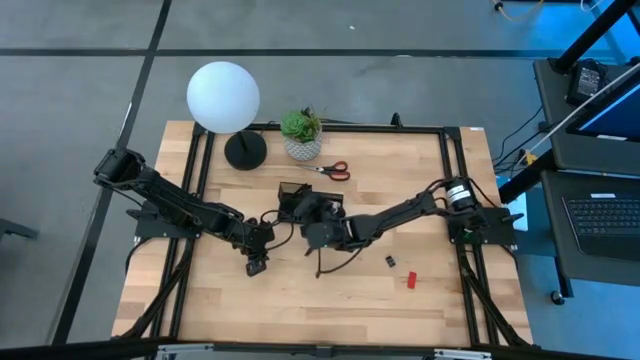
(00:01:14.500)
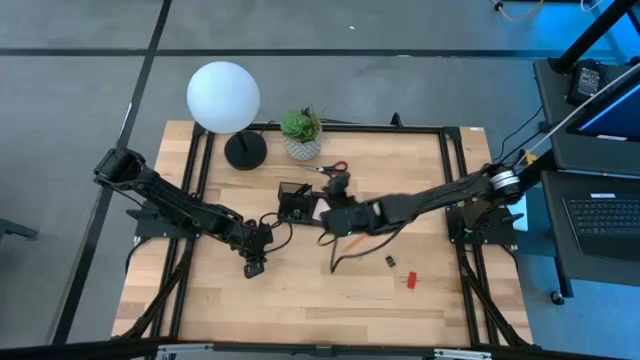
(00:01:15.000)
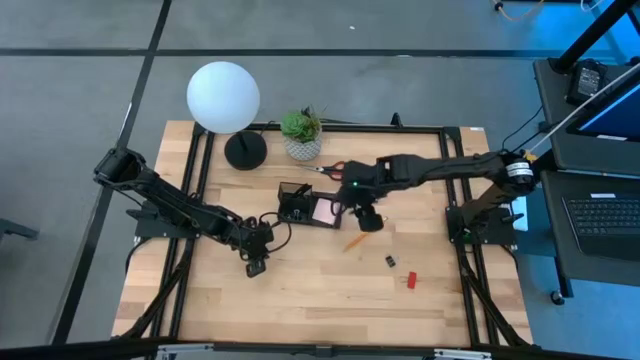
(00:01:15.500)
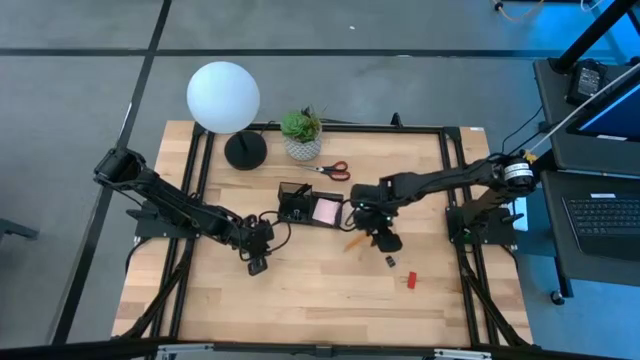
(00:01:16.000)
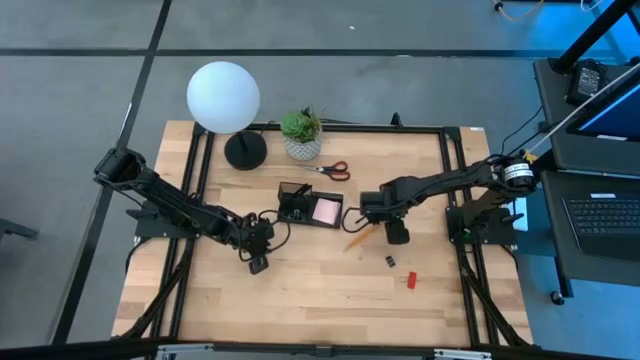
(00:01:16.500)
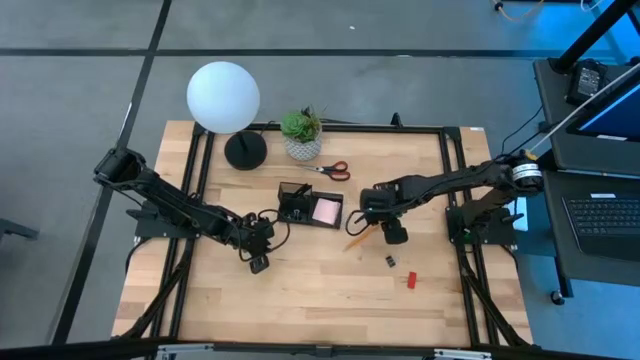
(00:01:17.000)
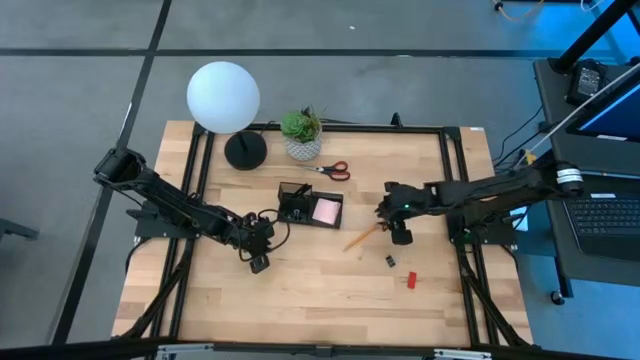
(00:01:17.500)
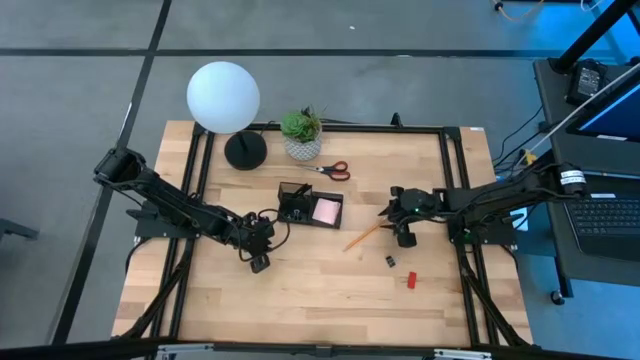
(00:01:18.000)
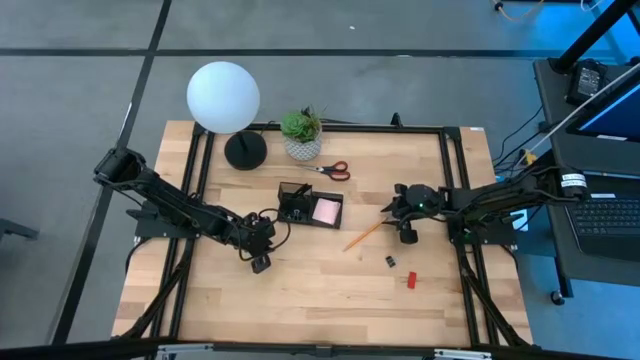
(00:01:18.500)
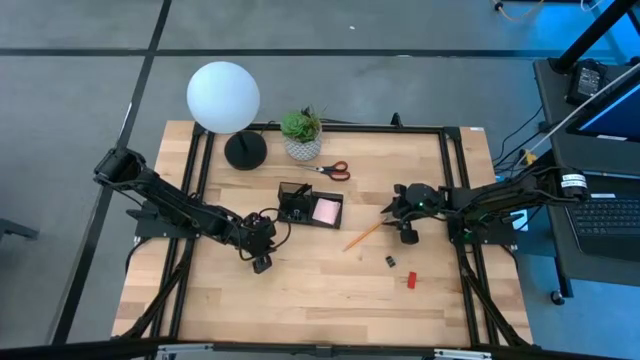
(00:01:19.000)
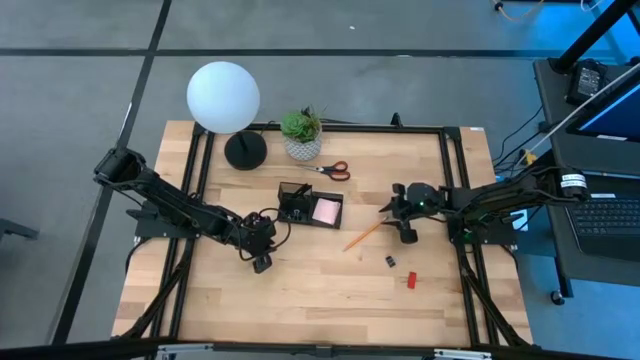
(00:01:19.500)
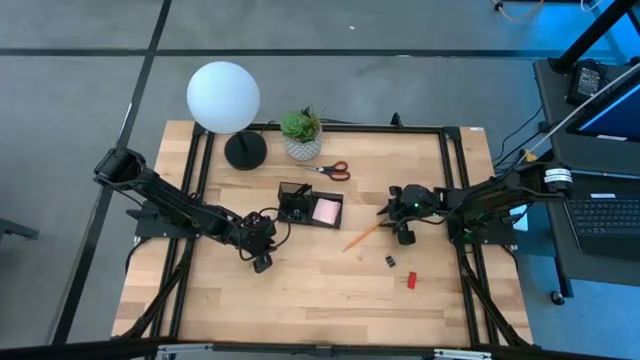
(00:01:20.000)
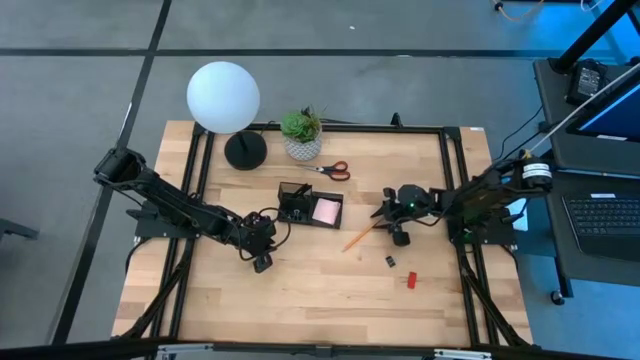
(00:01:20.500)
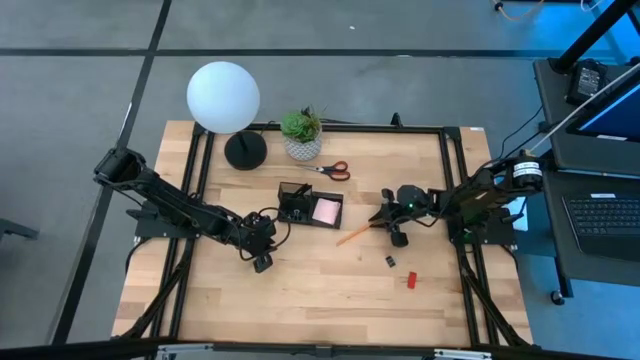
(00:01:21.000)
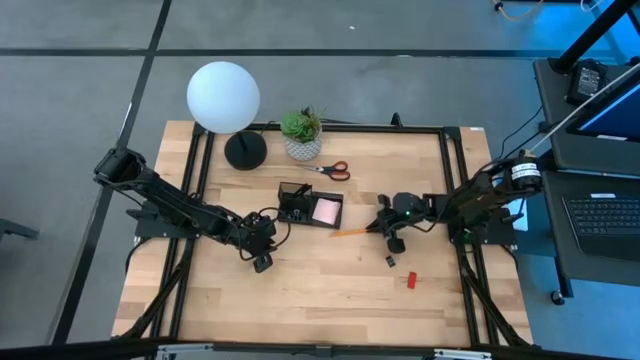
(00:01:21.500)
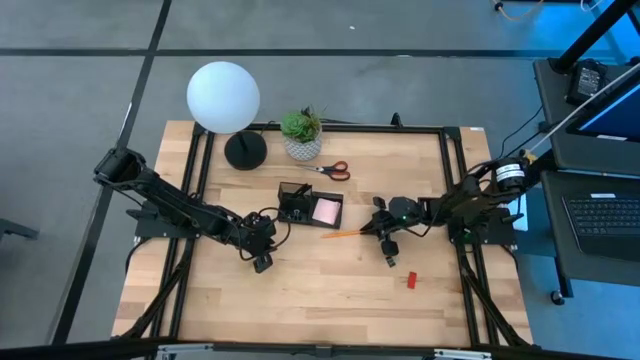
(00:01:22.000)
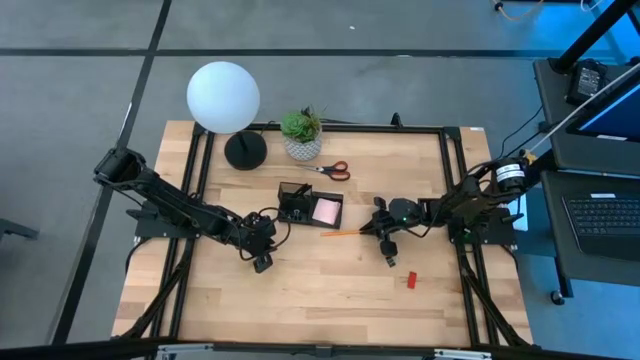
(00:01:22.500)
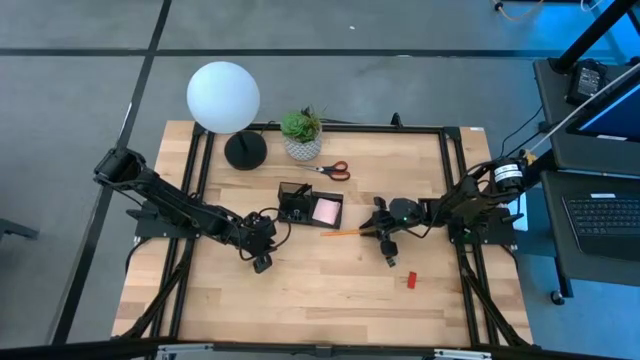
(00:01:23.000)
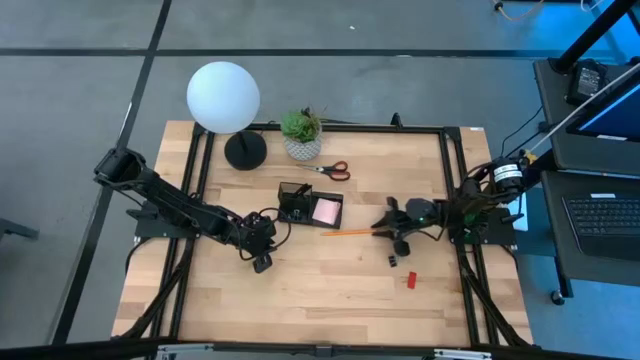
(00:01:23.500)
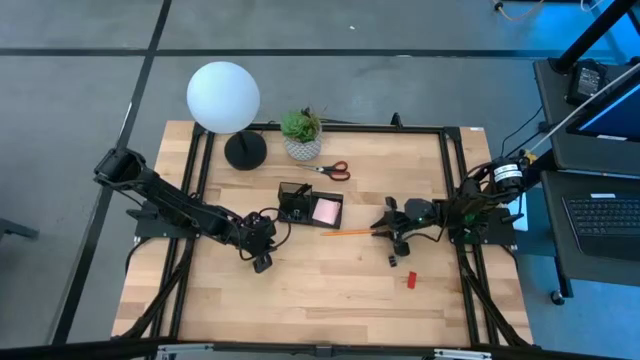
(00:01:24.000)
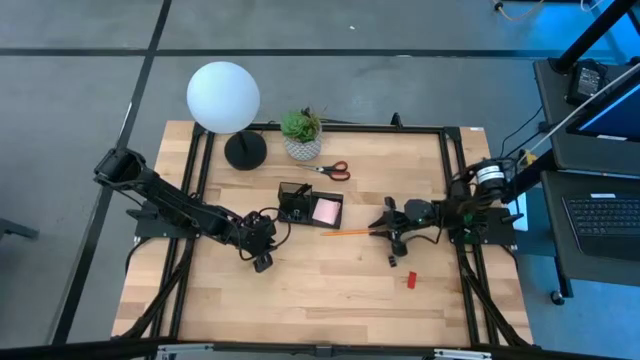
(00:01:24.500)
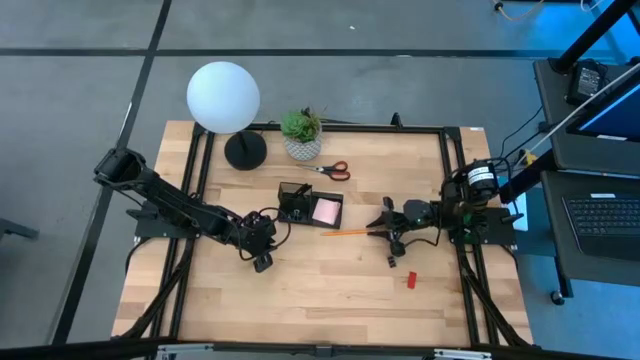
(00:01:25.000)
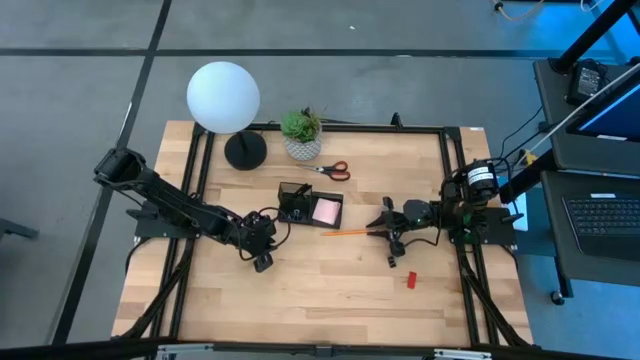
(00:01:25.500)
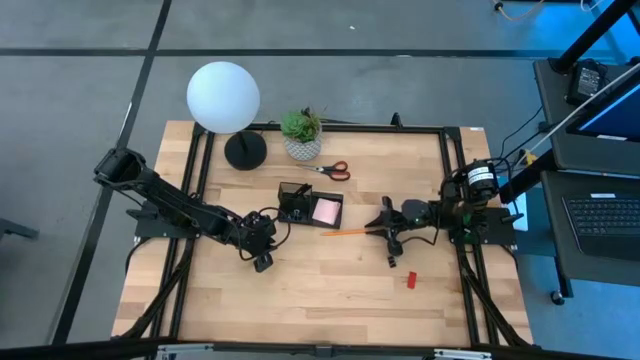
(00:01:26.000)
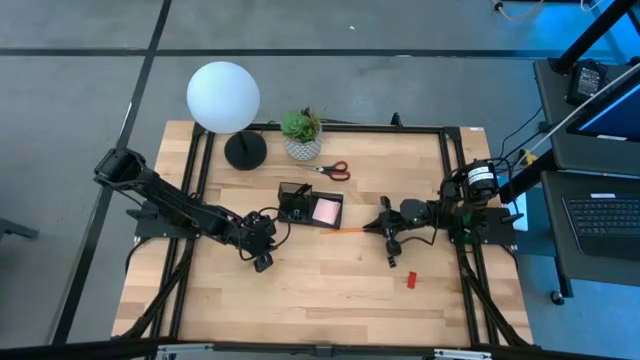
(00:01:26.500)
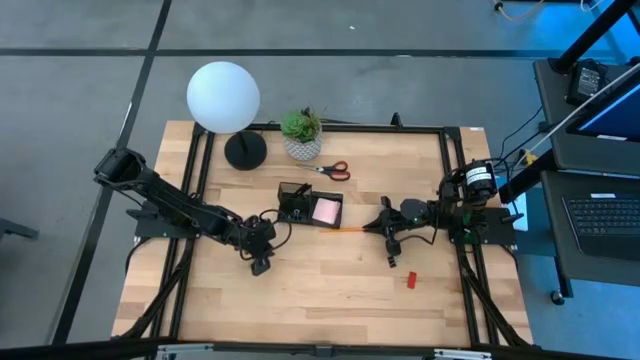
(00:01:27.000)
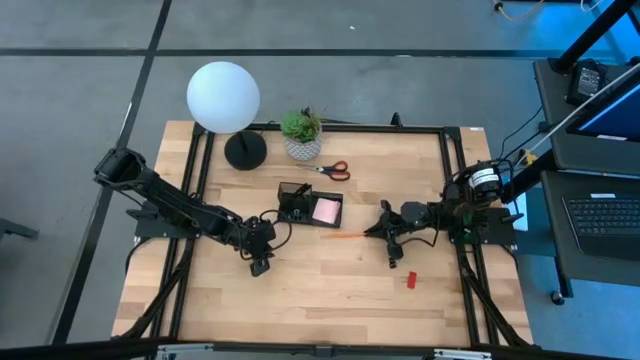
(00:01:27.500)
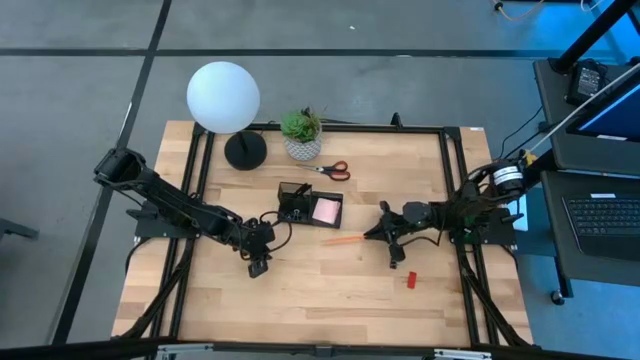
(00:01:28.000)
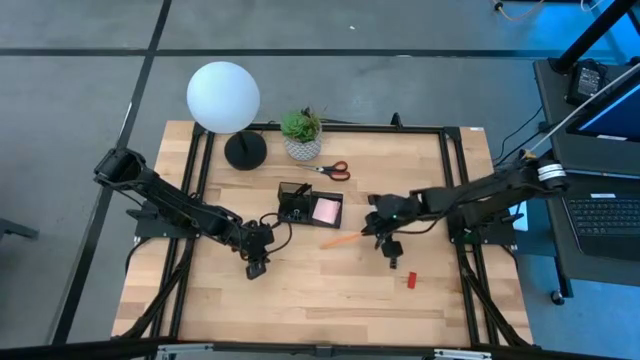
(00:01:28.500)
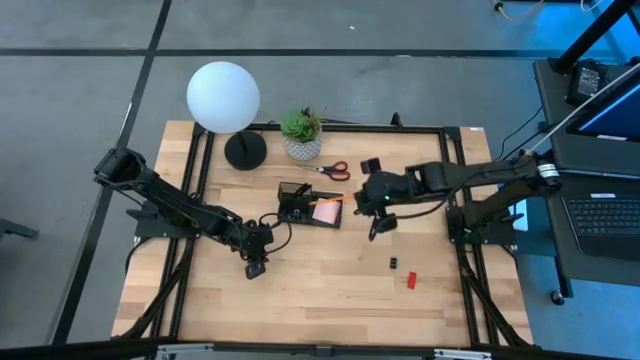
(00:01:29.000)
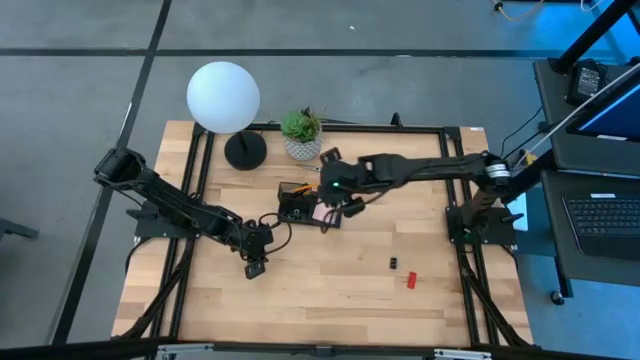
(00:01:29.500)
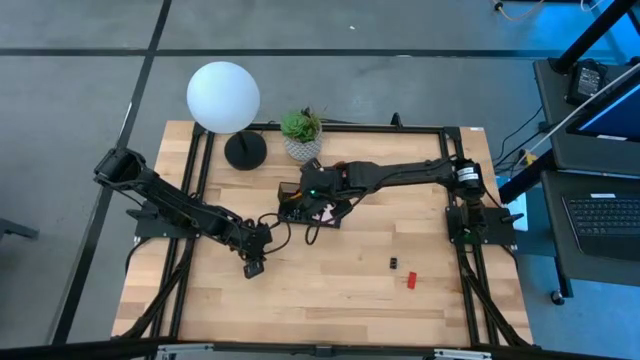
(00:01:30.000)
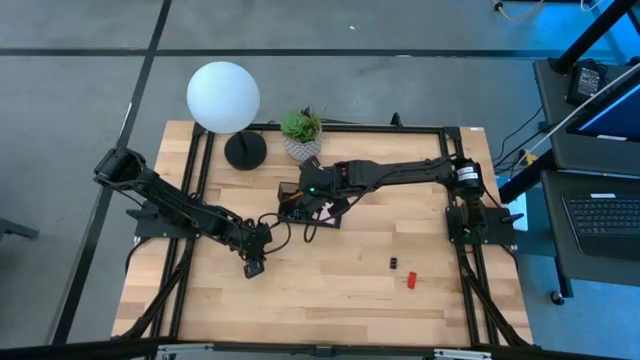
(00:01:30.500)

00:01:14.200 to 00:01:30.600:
Task: Pick and place office supplies into organizer
Put the yellow pencil into the black desk organizer

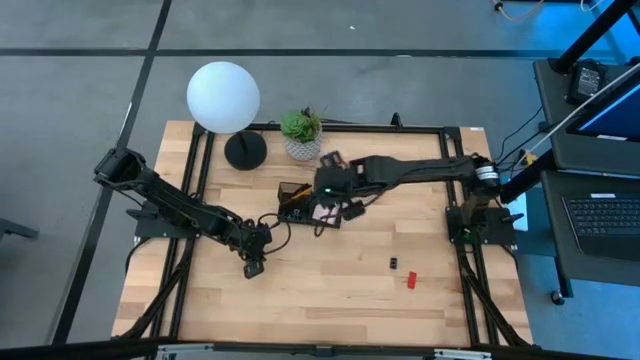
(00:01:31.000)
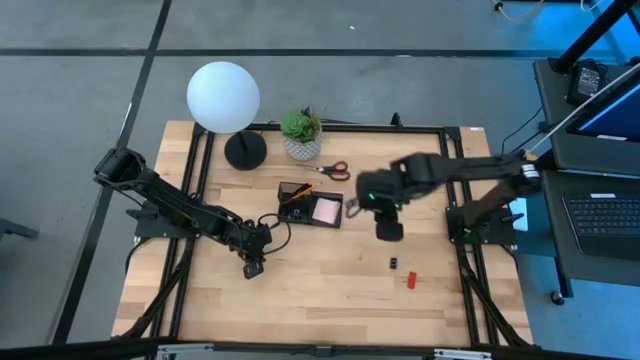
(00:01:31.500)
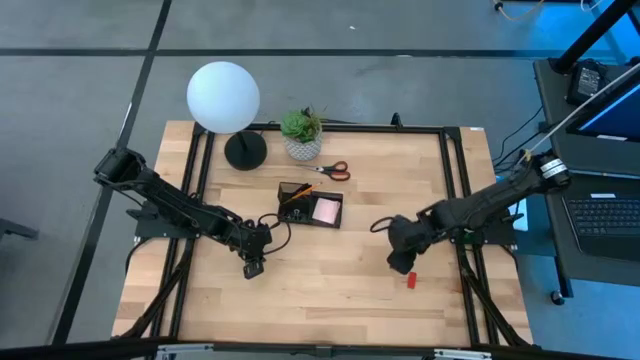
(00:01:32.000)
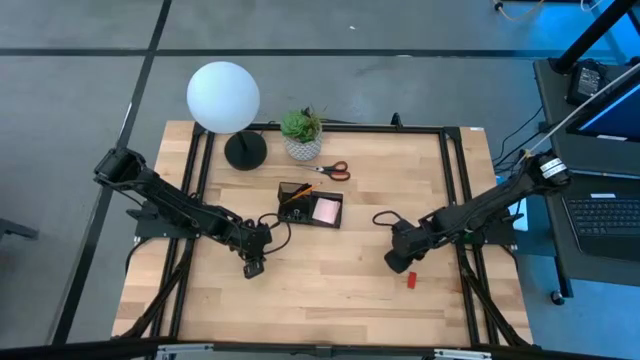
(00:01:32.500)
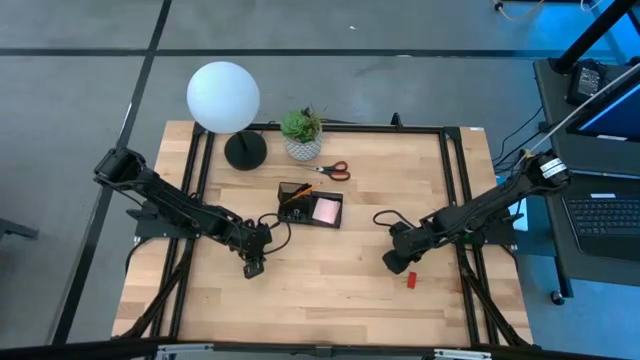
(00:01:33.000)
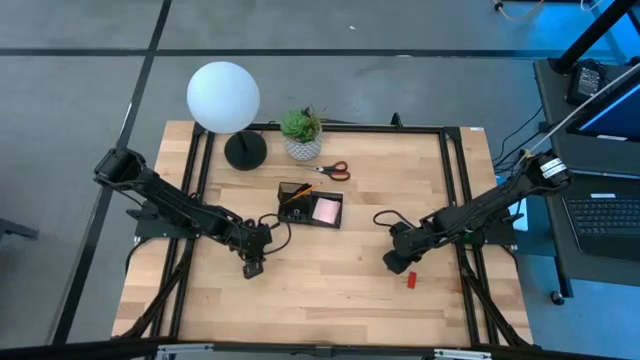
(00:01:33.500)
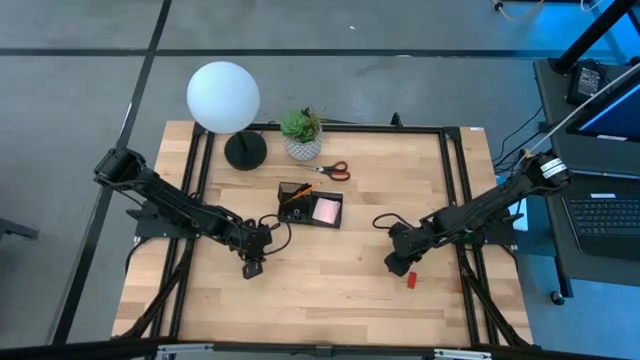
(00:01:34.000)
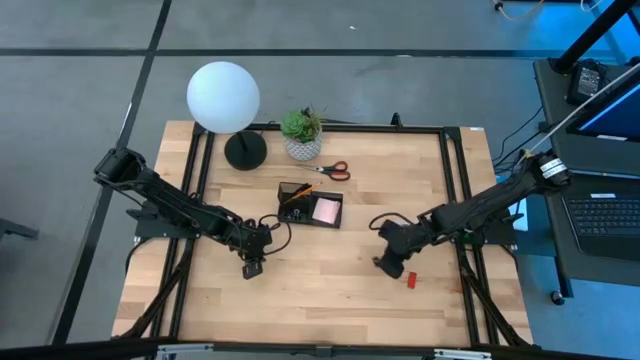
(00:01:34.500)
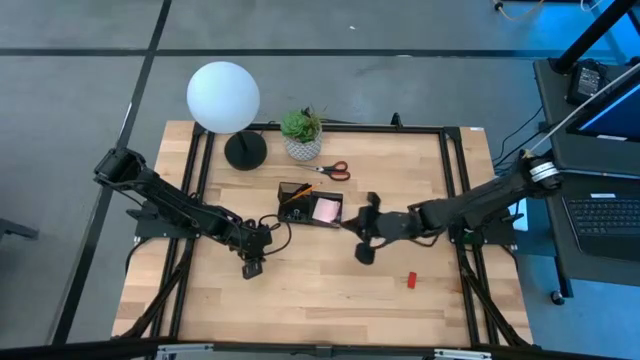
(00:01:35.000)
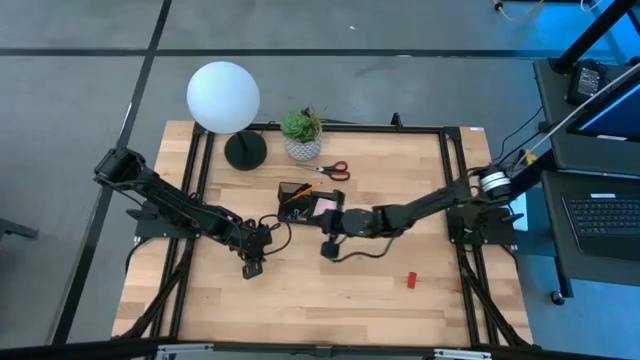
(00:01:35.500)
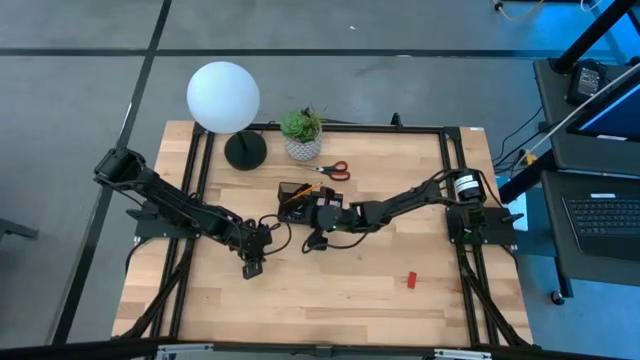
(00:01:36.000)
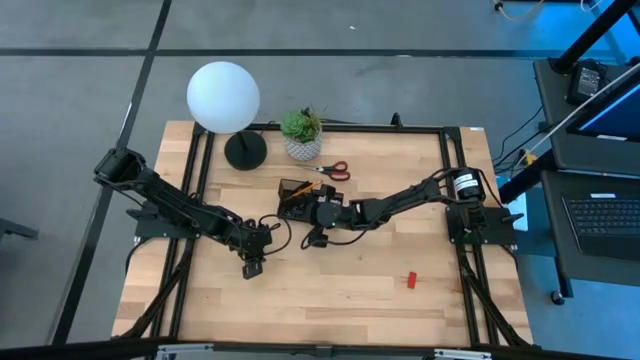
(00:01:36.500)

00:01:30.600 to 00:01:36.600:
Put the black binder clip into the black desk organizer
